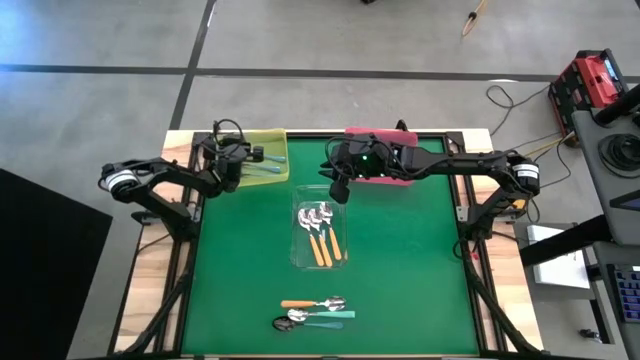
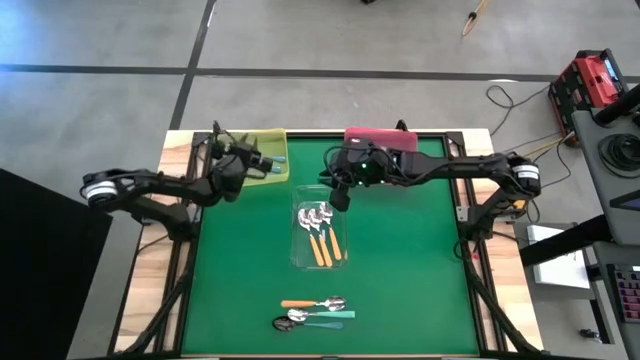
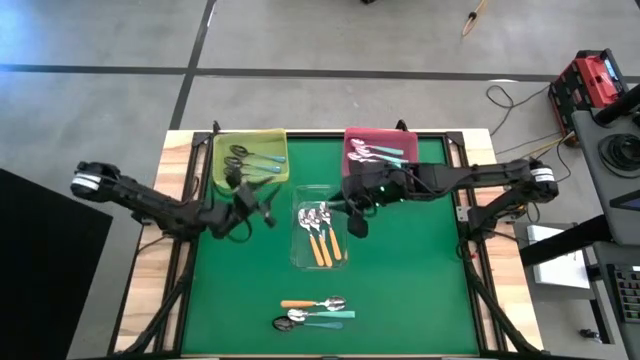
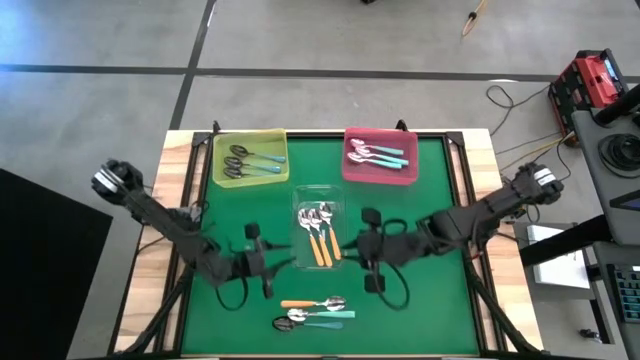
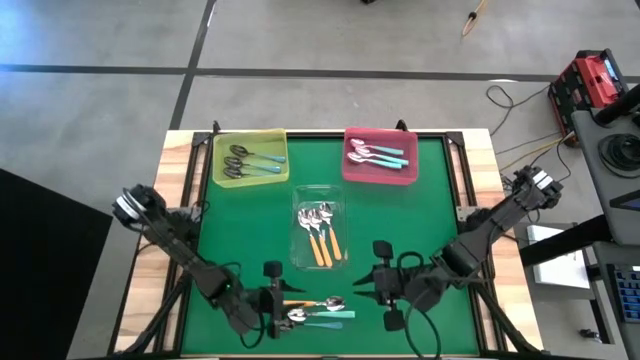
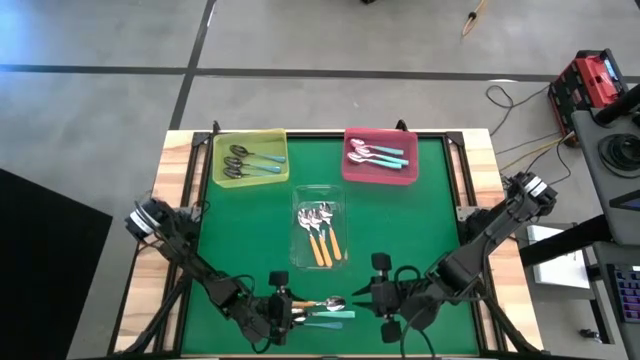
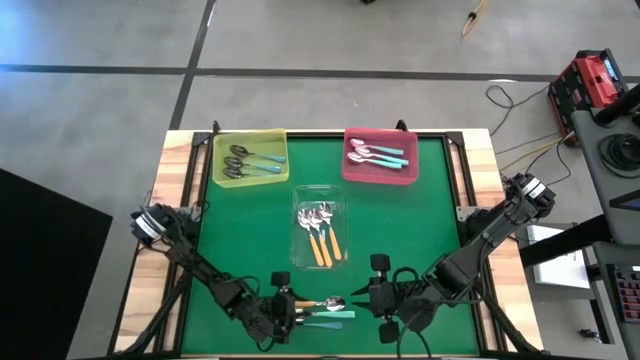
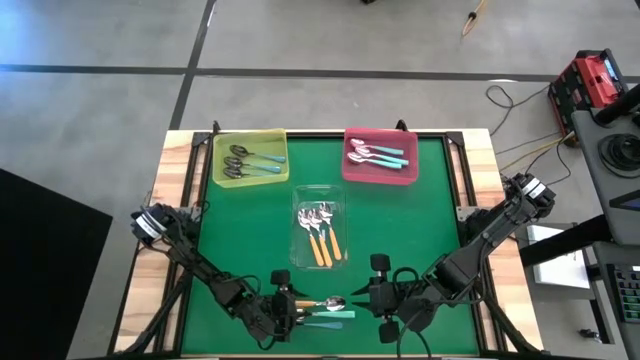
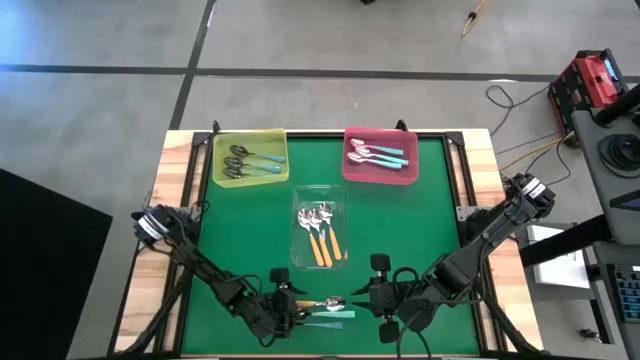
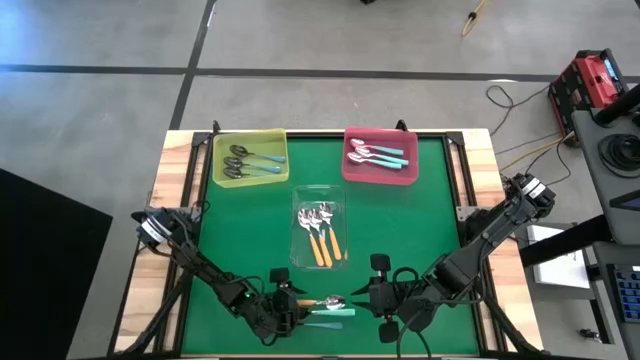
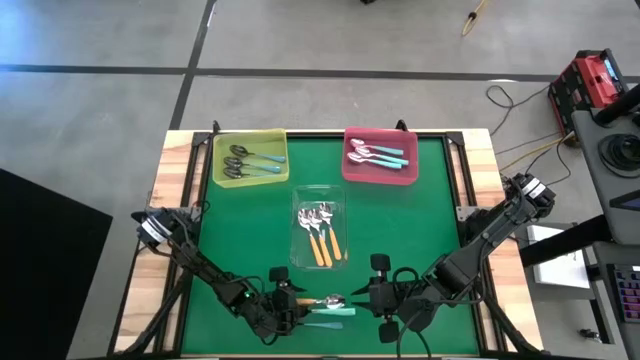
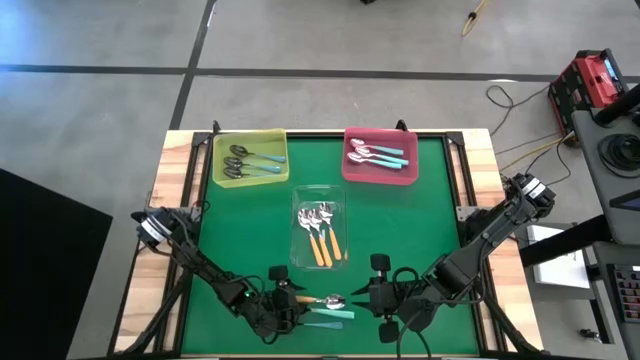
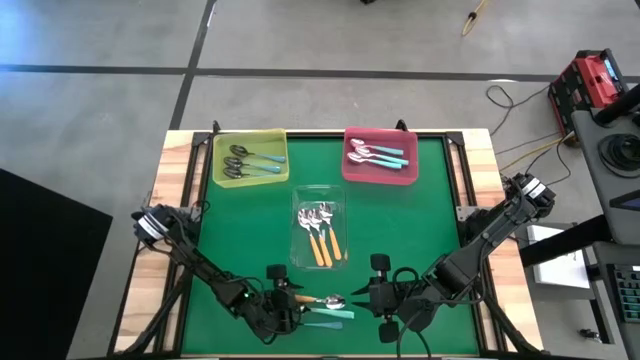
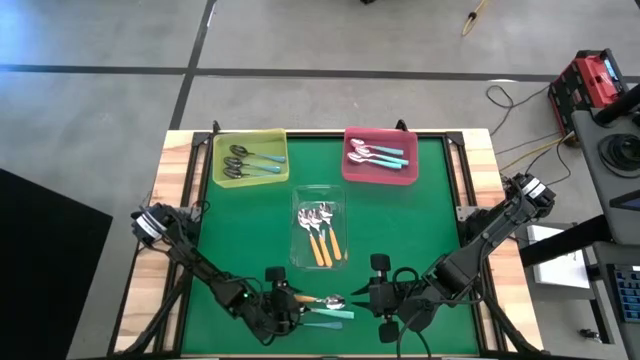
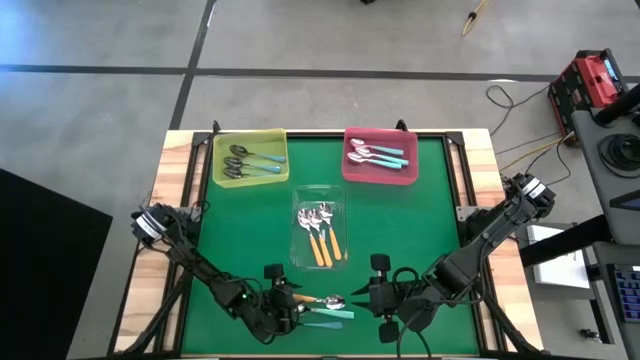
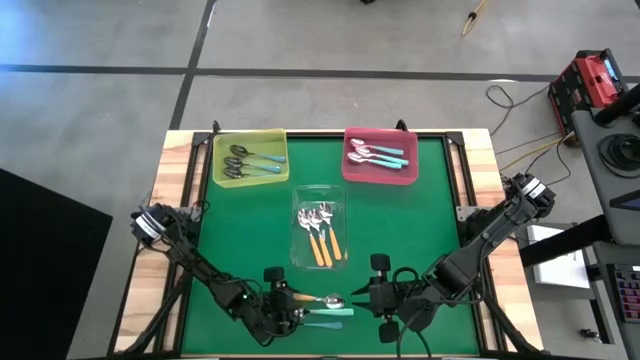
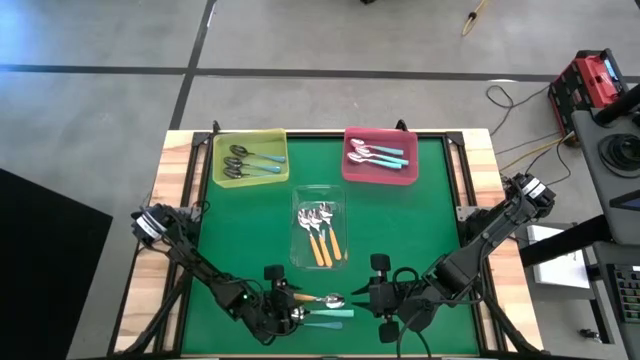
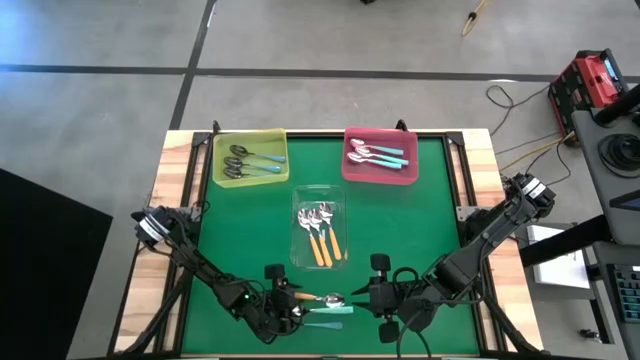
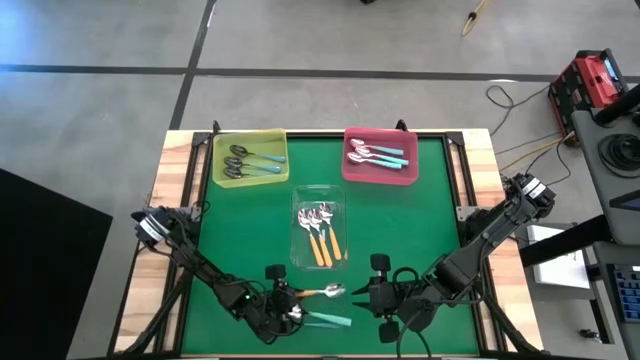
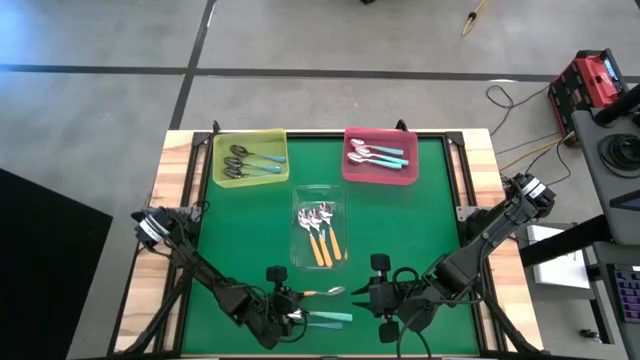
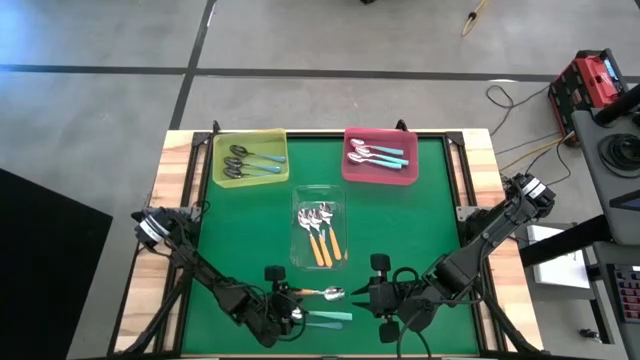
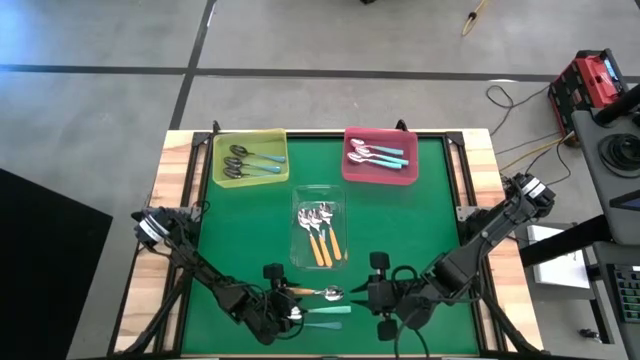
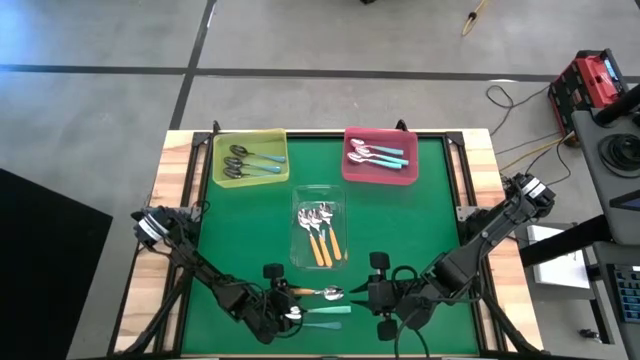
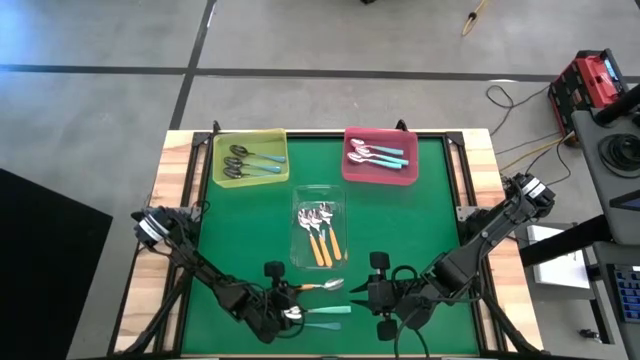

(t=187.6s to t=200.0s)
Task: Sort silverware by color (type)
Put the yellow spoon into the transparent bin

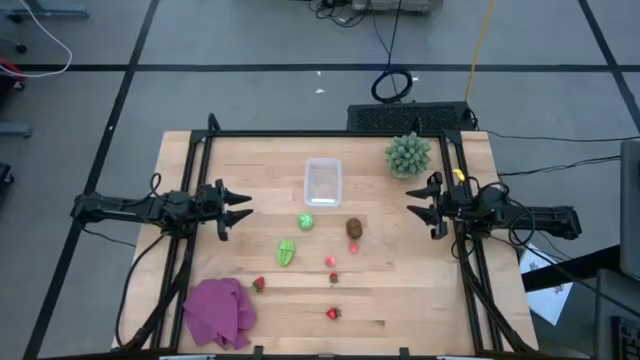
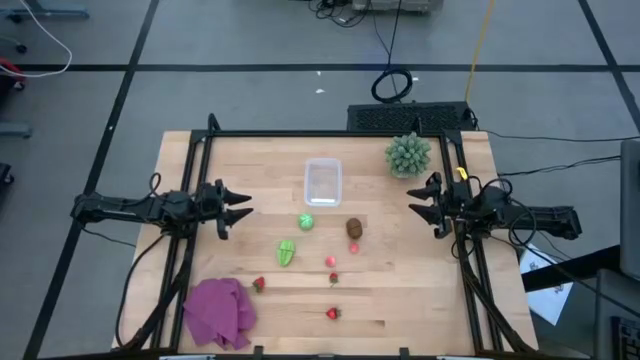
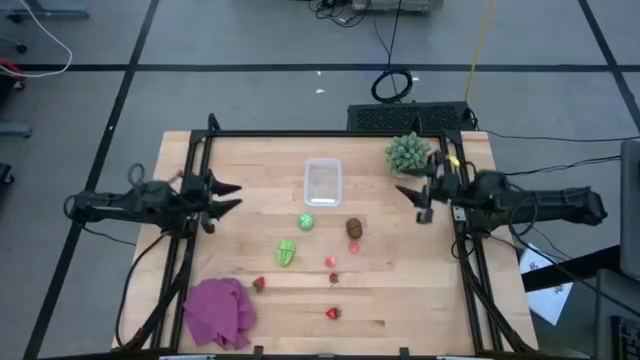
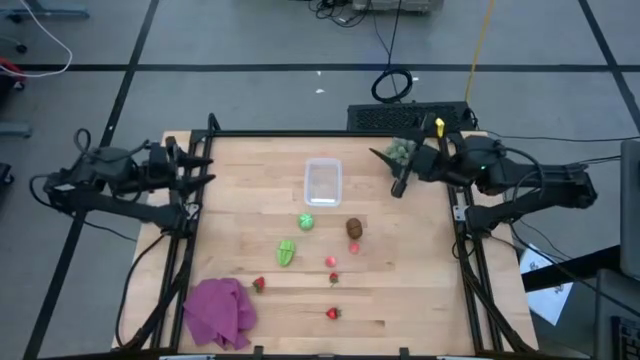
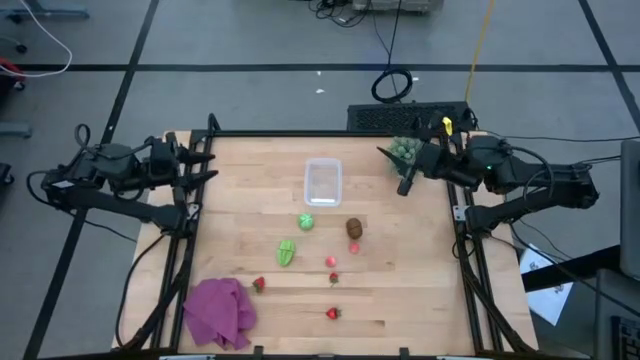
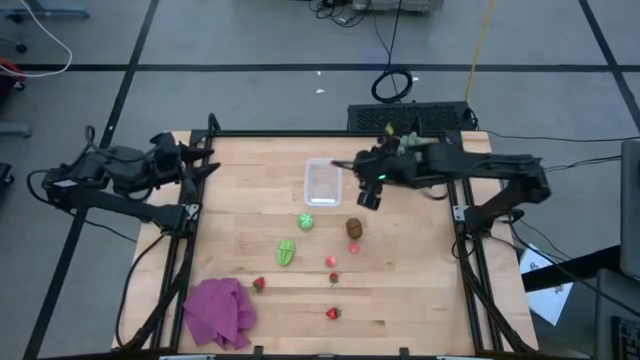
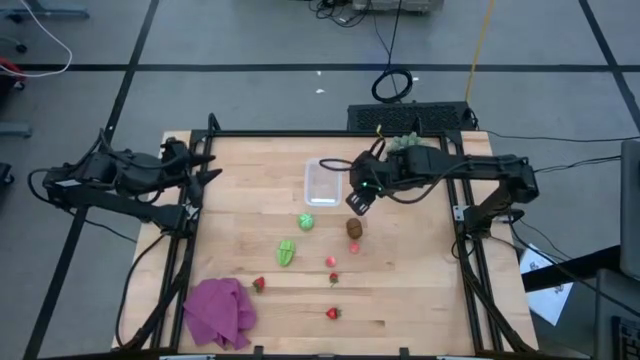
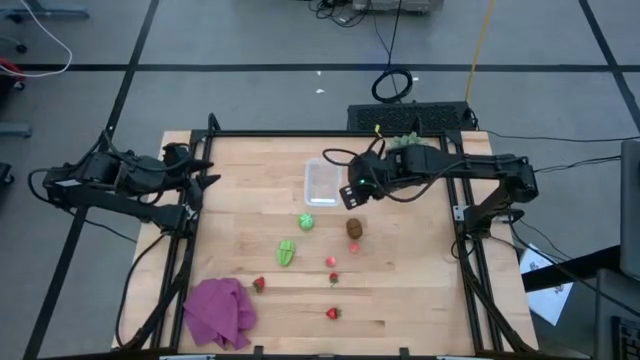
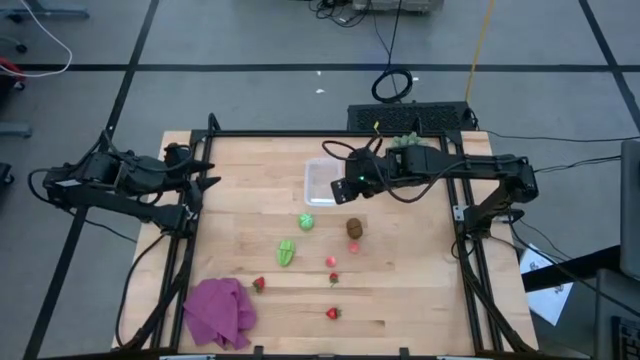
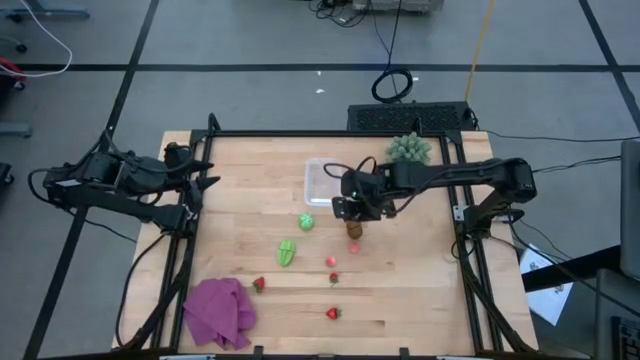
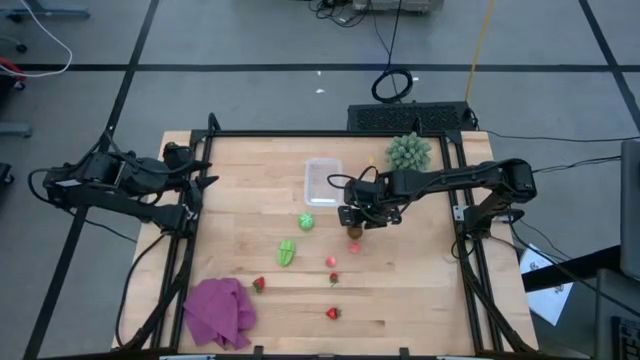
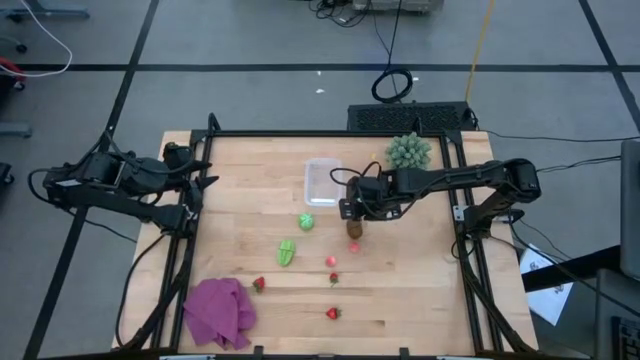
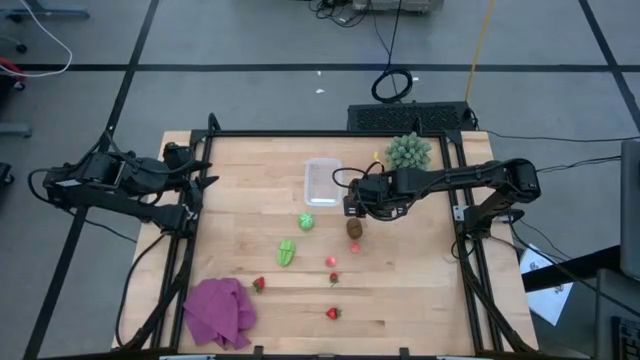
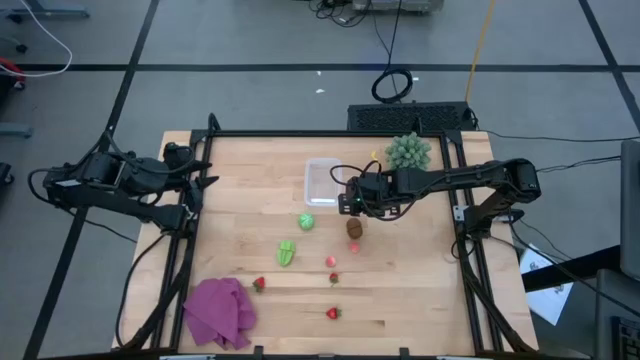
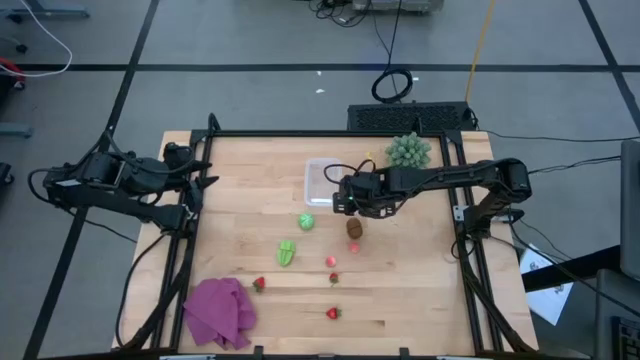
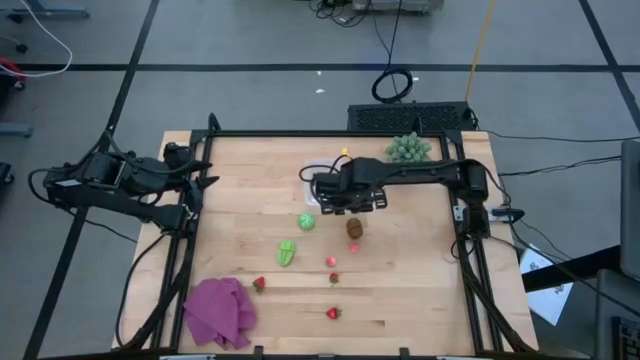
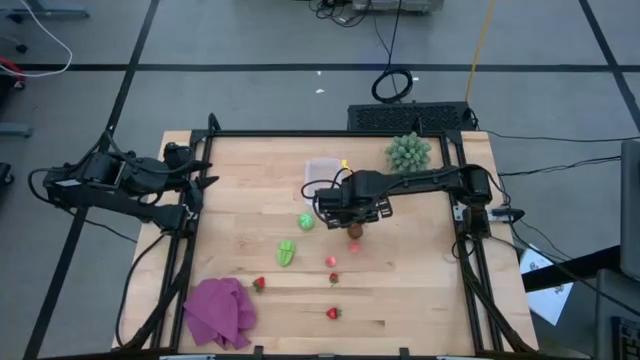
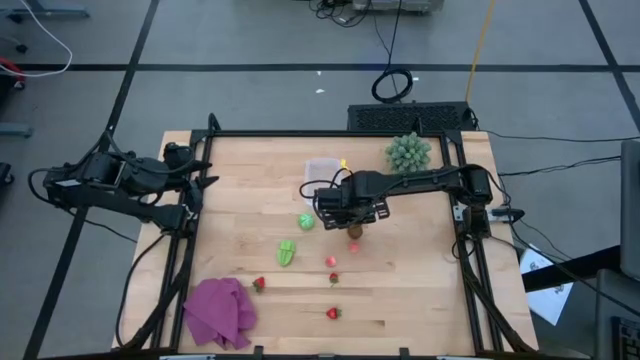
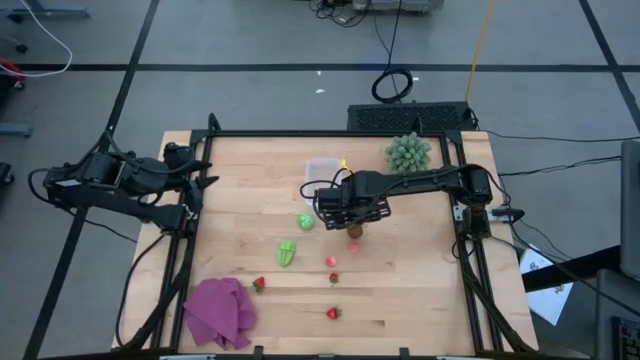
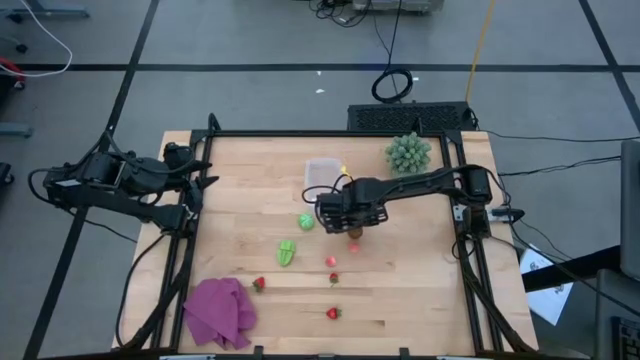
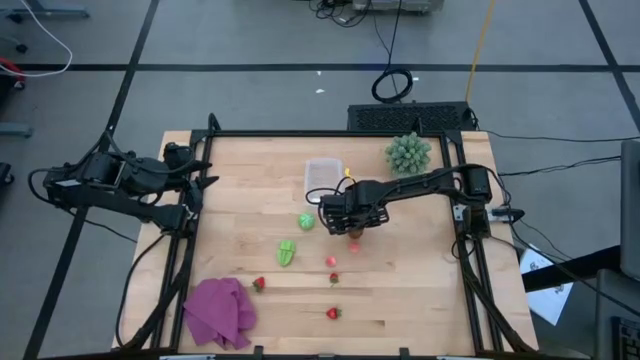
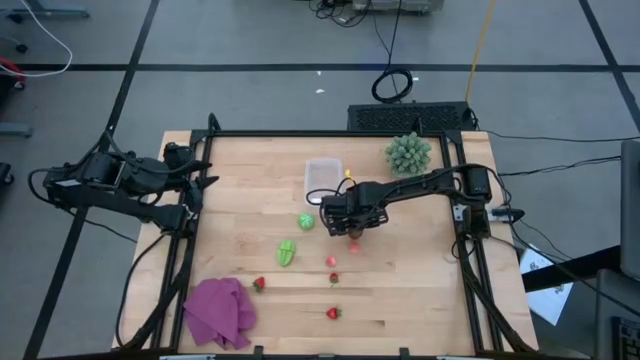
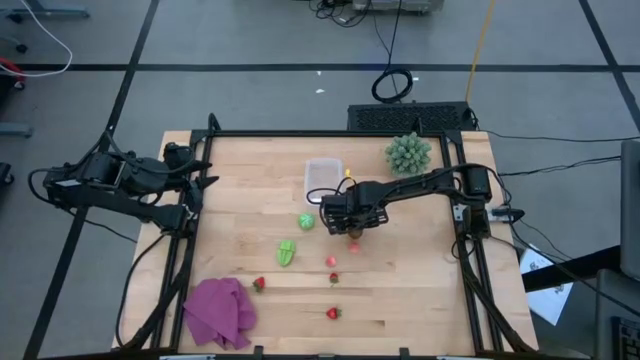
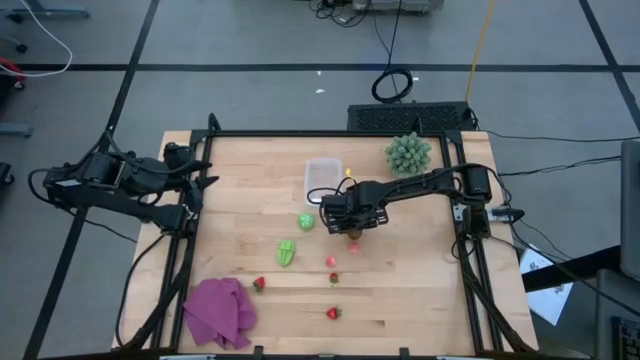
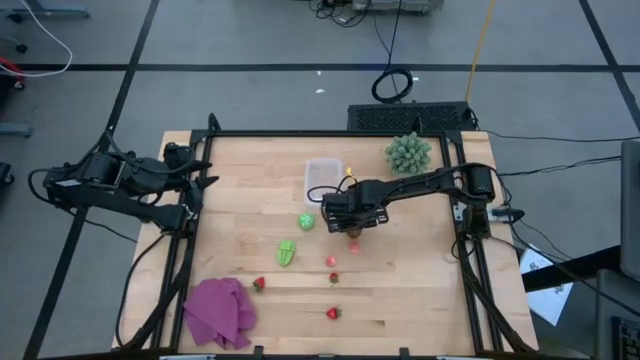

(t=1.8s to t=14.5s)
Task: Pick and placing Produce into tupperware
Put the kiwi into the transparent bin
